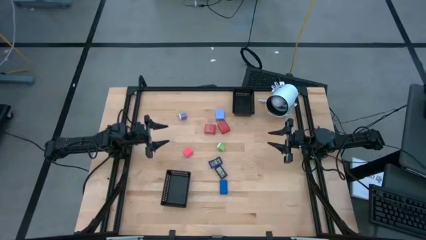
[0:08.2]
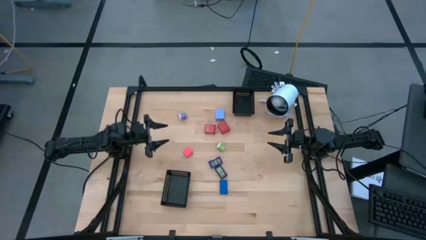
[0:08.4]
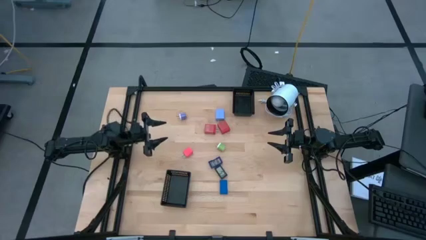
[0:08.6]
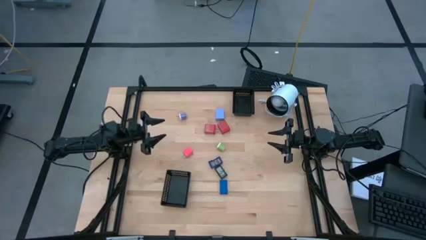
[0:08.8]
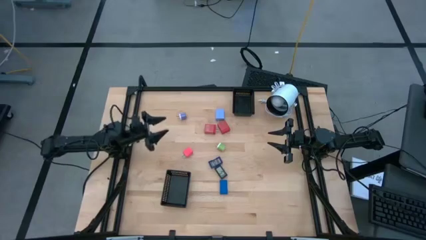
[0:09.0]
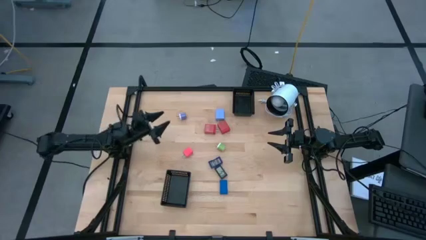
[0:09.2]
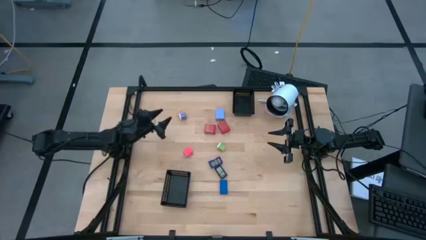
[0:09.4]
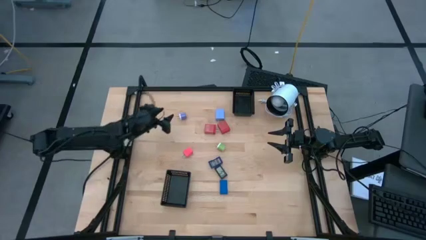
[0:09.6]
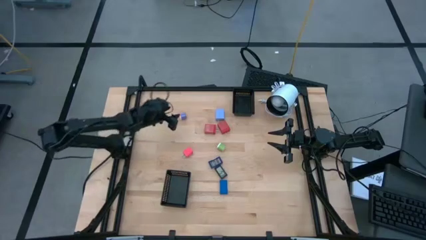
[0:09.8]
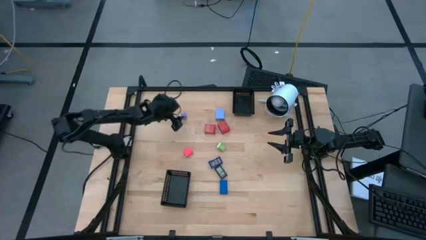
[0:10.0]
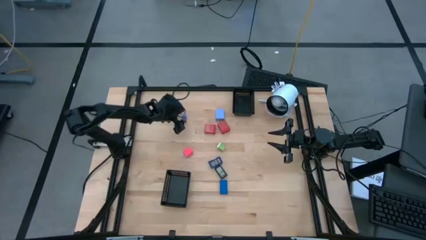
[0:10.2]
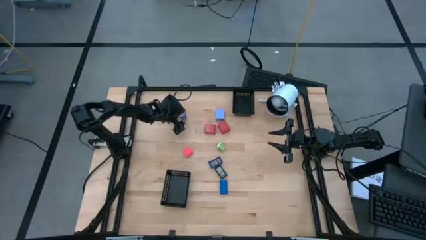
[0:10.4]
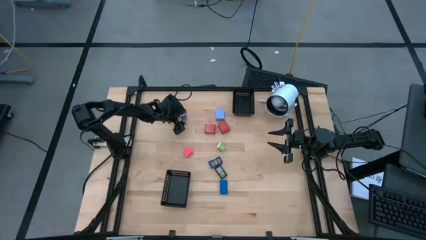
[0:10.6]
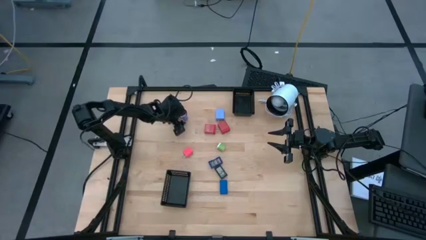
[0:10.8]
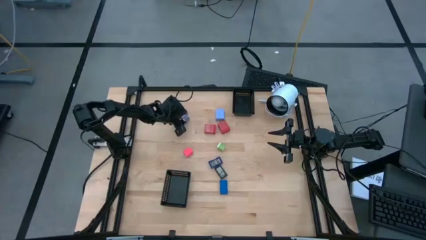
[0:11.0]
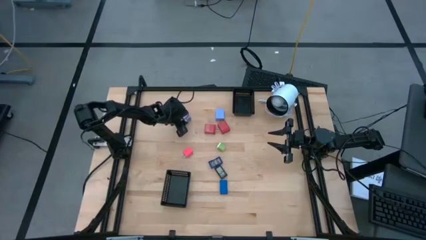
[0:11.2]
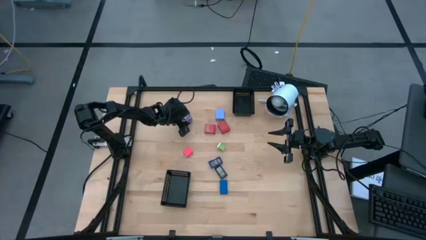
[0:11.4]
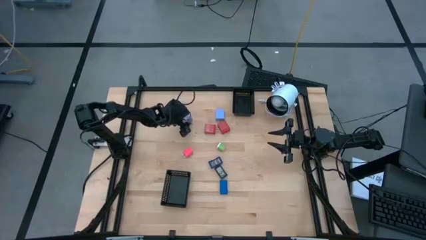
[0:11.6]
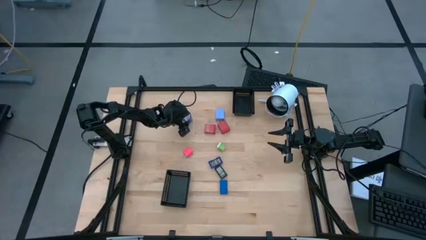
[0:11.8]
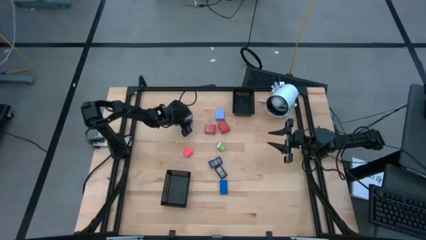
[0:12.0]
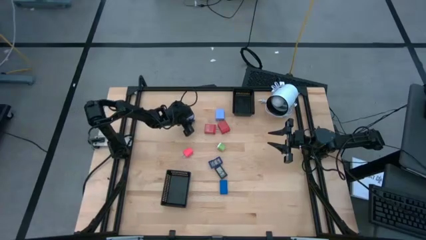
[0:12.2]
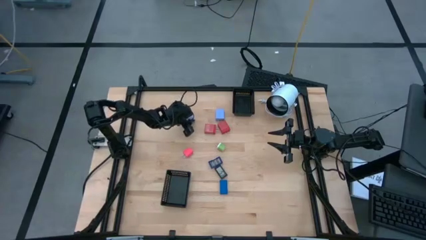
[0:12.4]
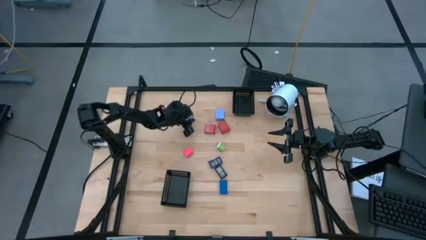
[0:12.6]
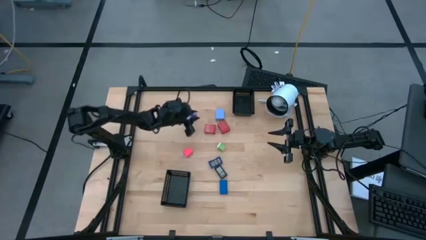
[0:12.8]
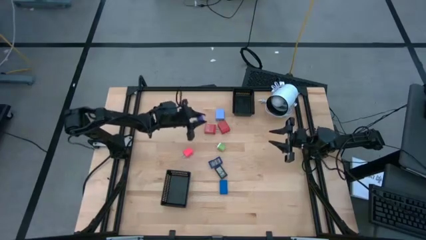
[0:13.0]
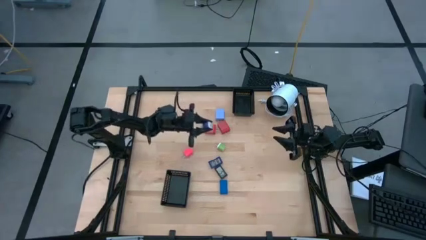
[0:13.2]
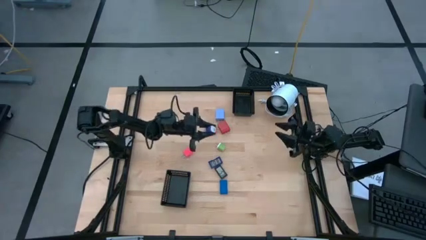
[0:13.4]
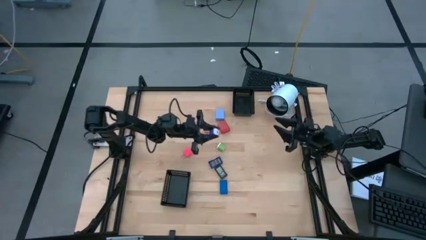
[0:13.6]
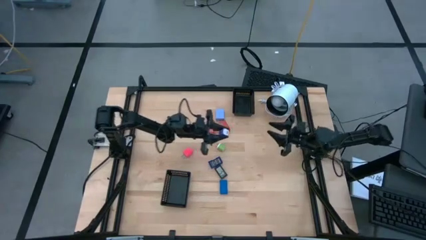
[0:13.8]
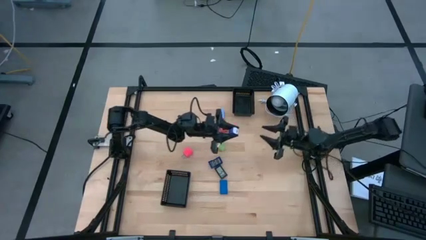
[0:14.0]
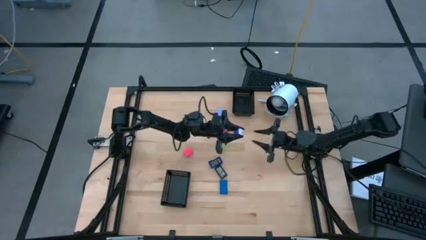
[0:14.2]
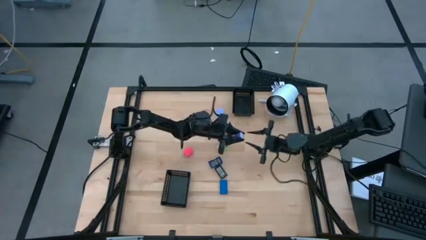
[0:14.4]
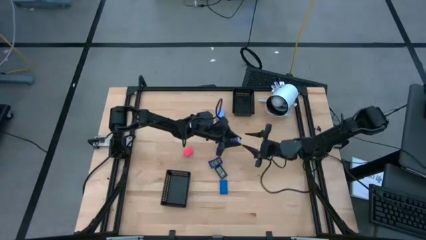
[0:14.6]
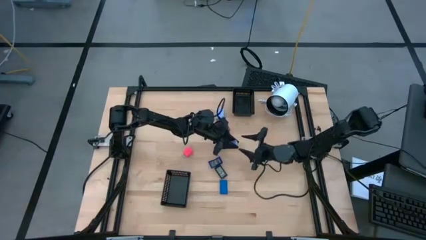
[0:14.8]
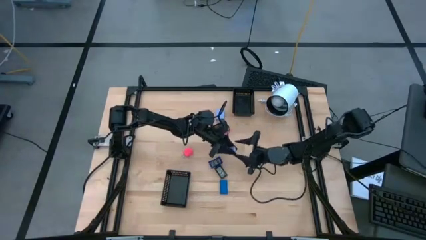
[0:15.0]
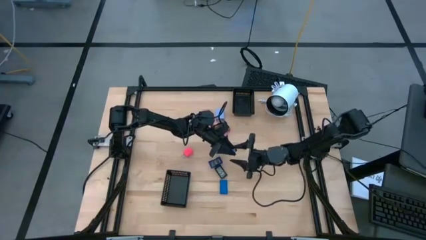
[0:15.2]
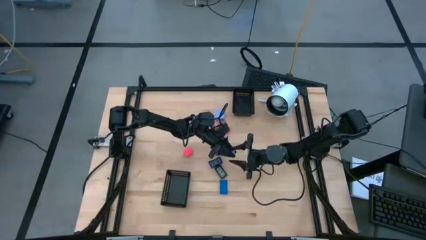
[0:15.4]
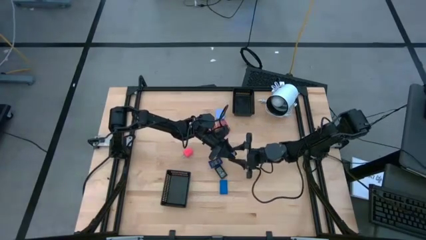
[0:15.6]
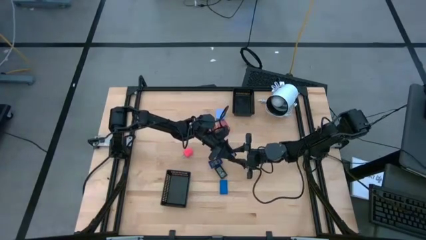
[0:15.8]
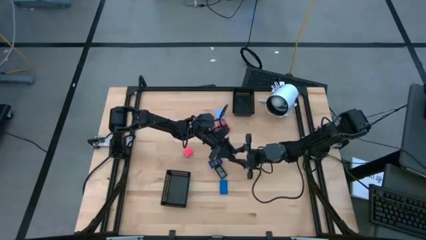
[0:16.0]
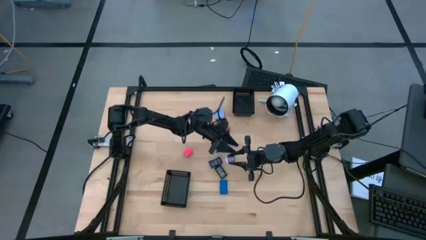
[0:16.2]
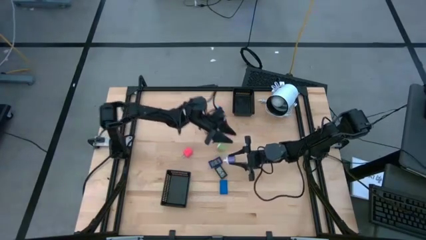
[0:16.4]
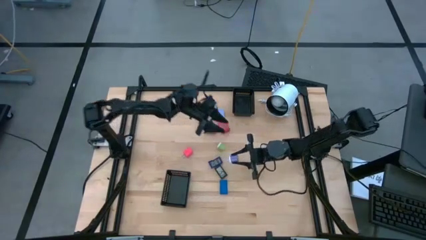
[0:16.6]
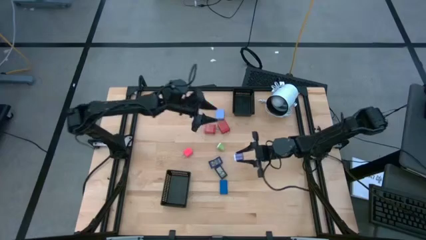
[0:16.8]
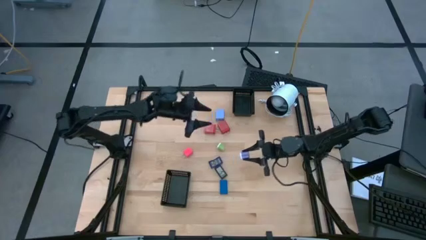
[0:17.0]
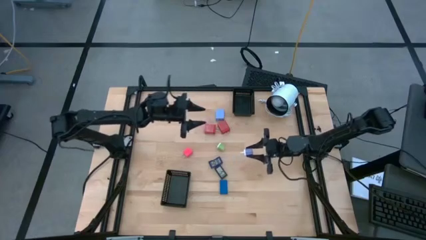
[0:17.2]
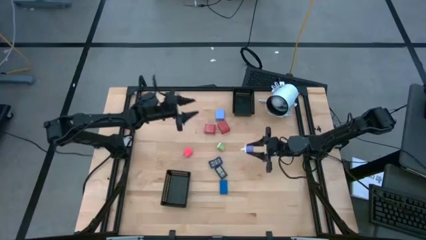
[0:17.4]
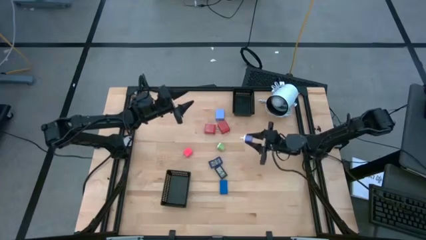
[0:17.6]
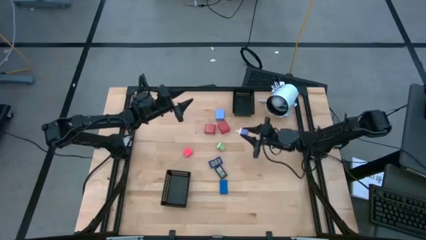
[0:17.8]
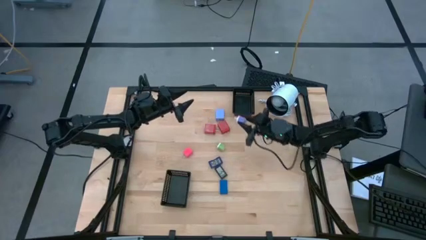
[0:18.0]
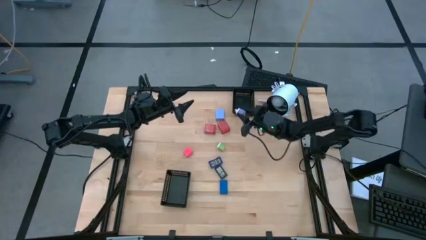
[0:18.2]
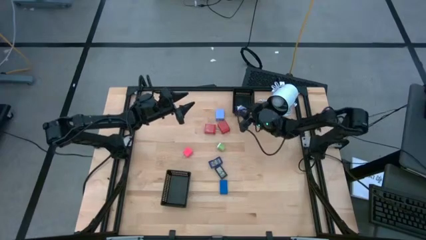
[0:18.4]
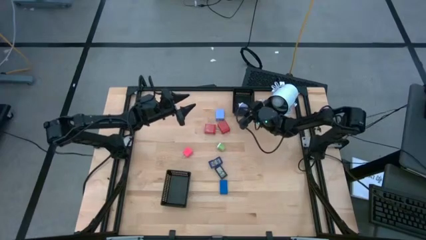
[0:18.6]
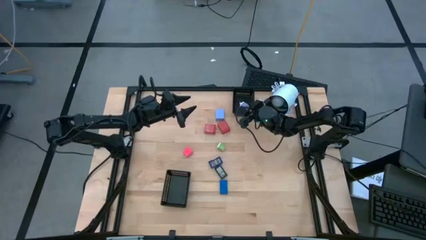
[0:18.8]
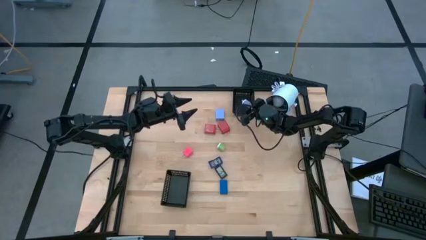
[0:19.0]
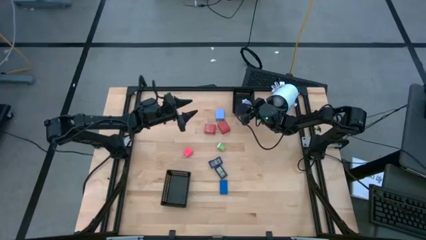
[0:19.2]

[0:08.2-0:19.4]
Task: Pick & Place Office items
Put the purple charger adapter into the top black basket

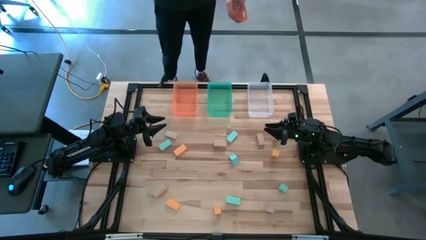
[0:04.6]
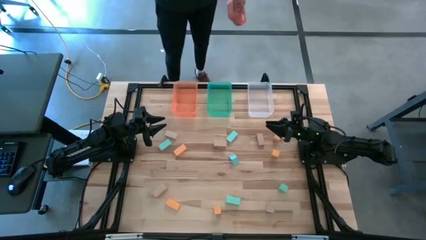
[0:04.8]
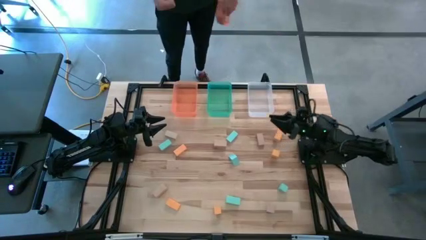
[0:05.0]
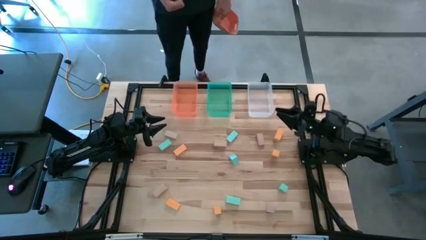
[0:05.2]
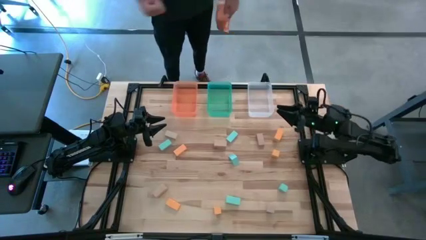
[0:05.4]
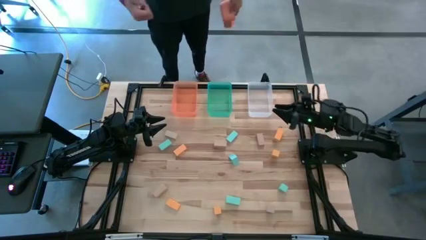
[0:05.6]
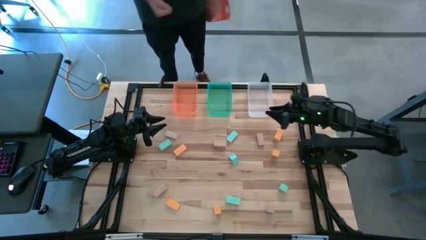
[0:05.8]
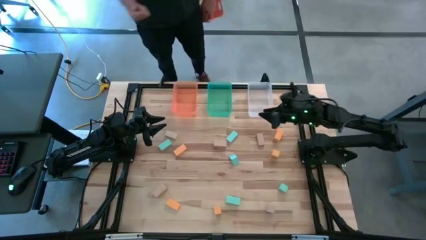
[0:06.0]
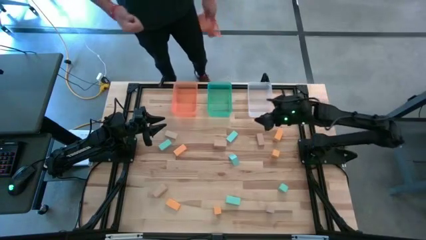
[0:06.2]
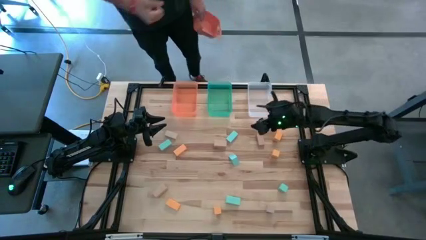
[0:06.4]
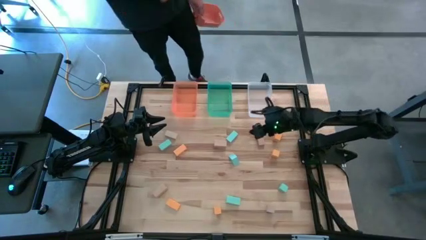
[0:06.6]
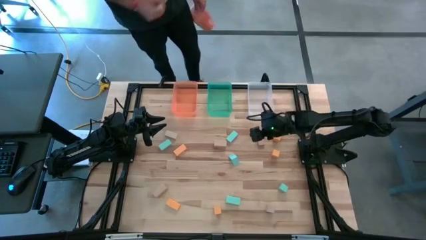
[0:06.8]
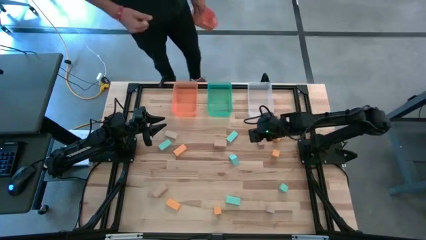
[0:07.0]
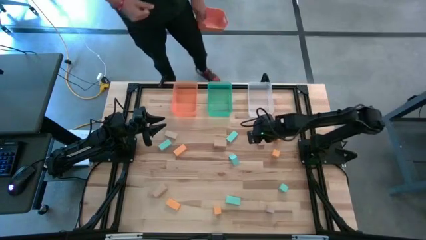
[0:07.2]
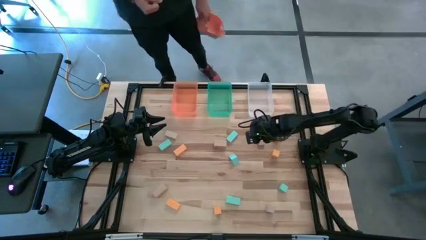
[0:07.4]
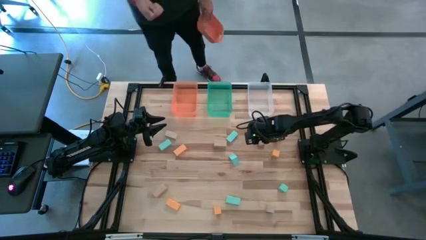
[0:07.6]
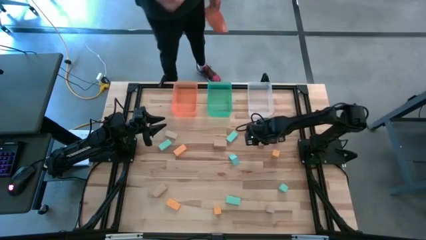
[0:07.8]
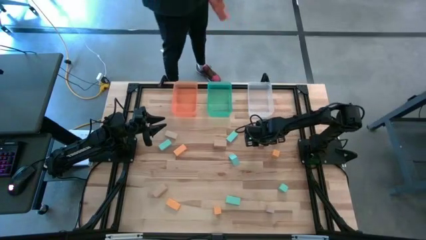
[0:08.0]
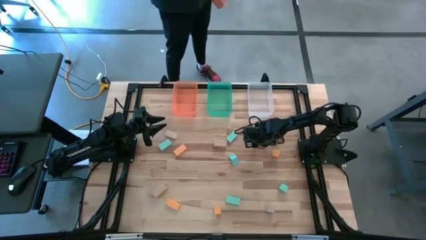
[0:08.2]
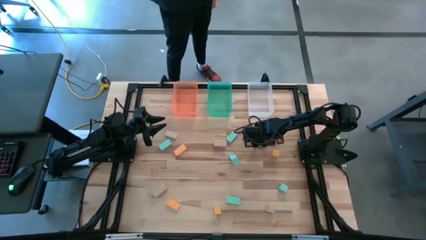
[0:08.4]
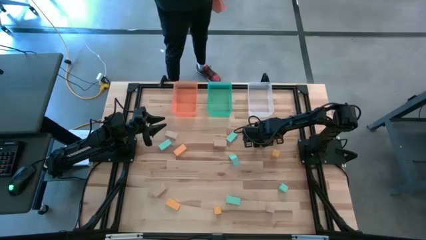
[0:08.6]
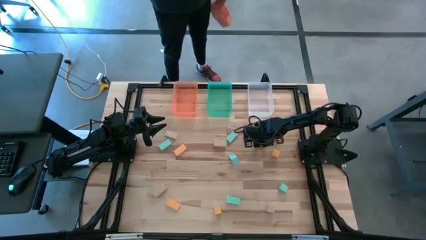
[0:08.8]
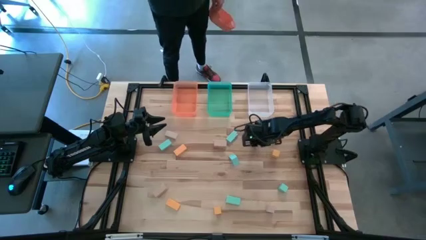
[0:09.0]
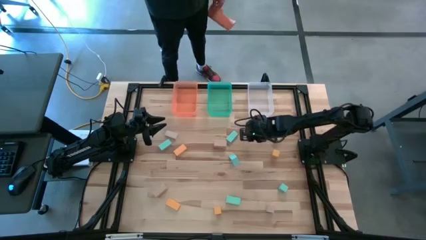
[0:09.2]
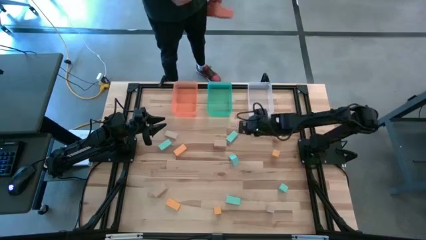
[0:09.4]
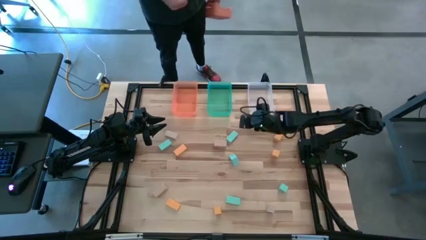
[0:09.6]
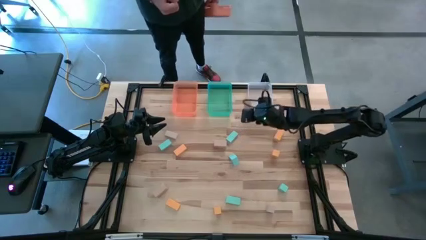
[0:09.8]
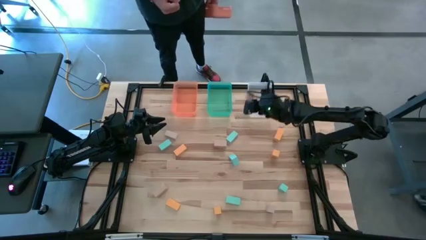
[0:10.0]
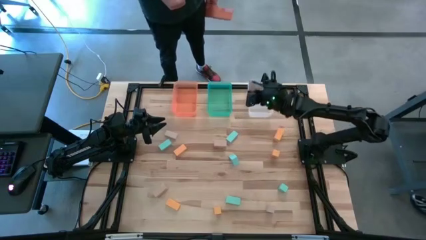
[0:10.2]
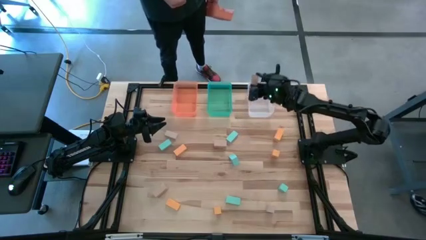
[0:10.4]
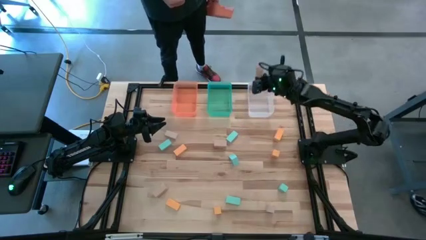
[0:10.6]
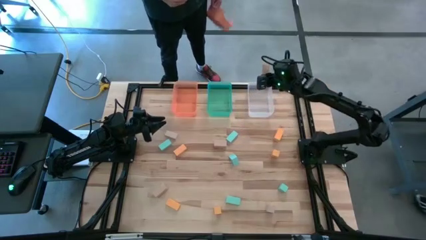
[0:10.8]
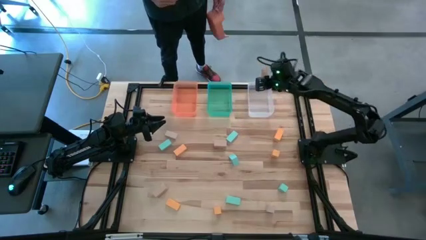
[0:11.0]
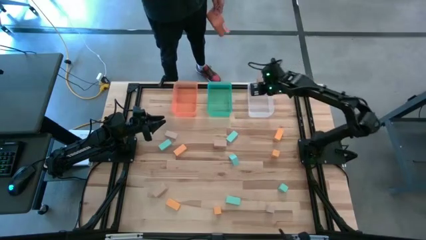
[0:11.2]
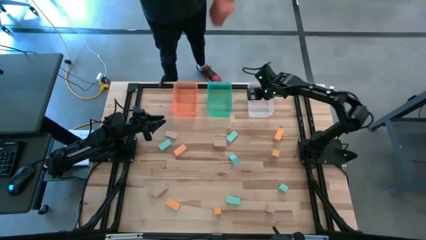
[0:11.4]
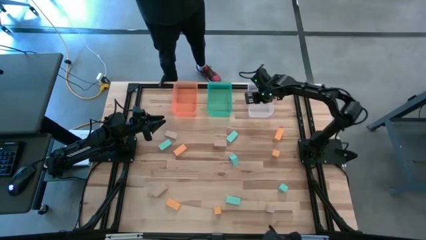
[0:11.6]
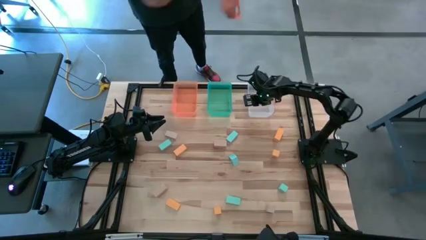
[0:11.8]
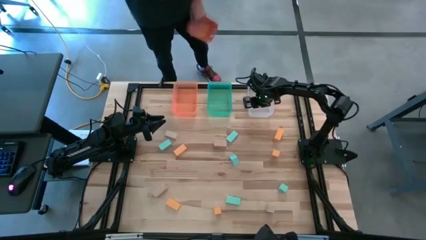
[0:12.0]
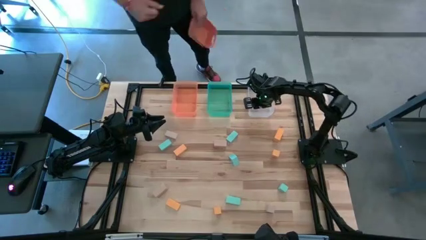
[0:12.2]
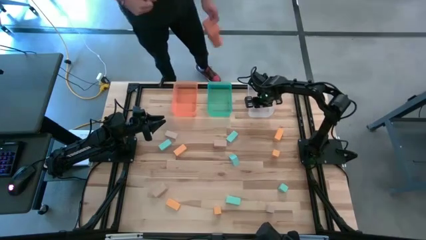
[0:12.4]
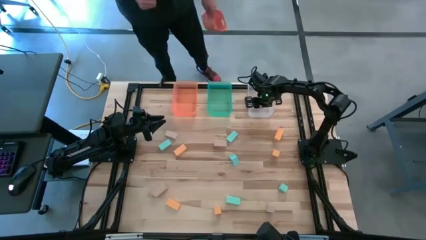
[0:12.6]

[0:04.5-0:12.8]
Task: Sort & place blocks by color
Put the brown block into the transparent bin
